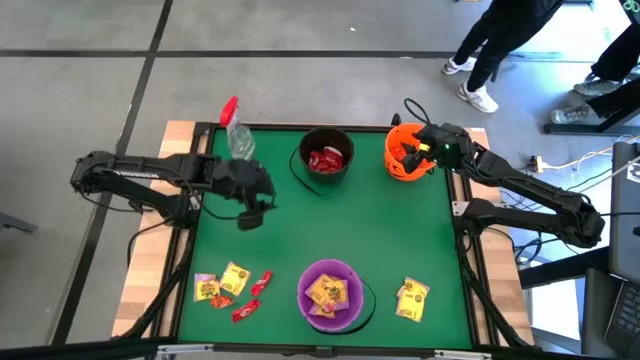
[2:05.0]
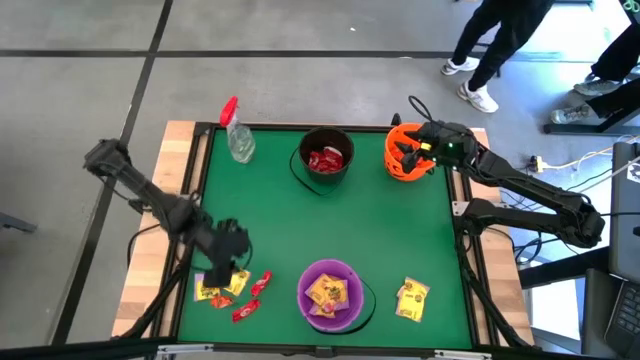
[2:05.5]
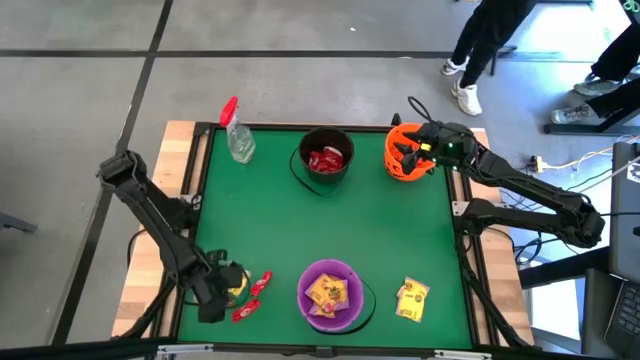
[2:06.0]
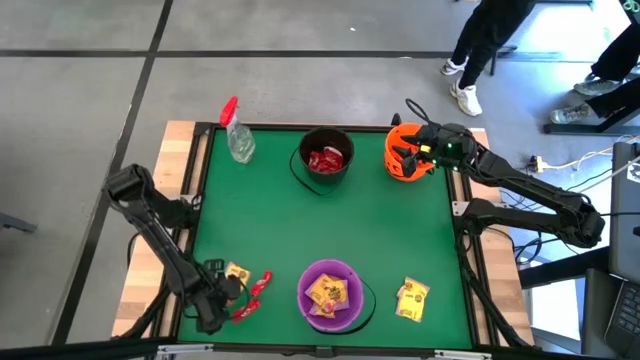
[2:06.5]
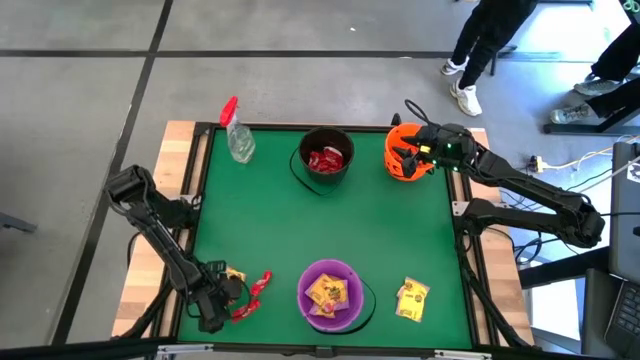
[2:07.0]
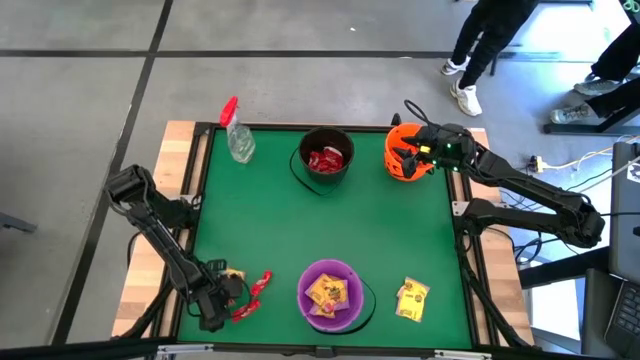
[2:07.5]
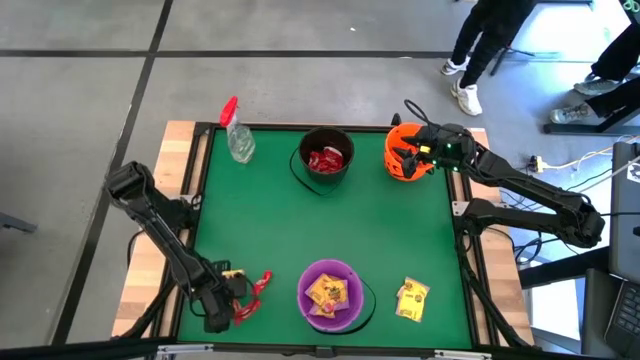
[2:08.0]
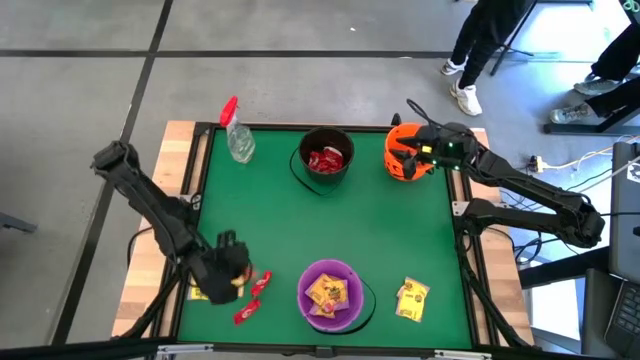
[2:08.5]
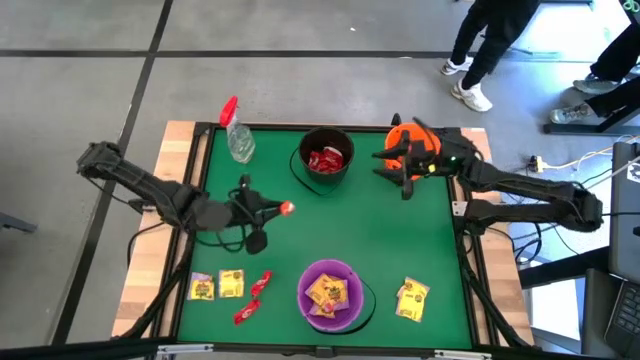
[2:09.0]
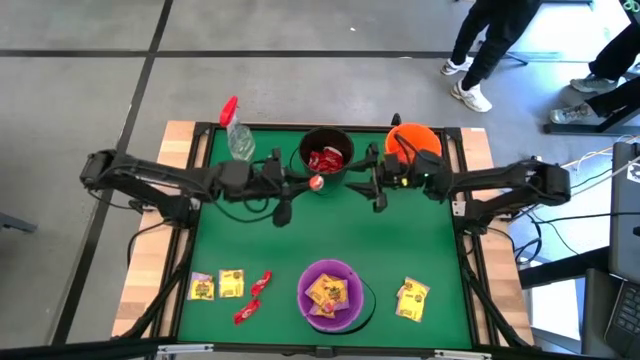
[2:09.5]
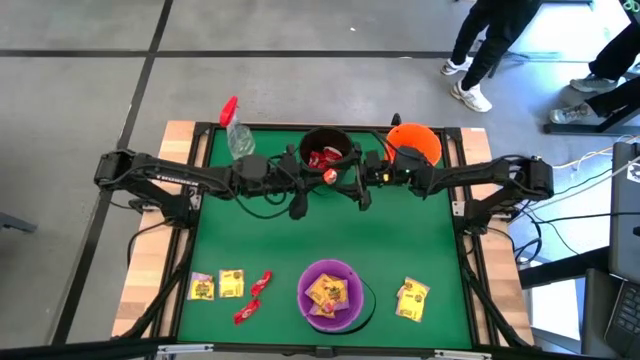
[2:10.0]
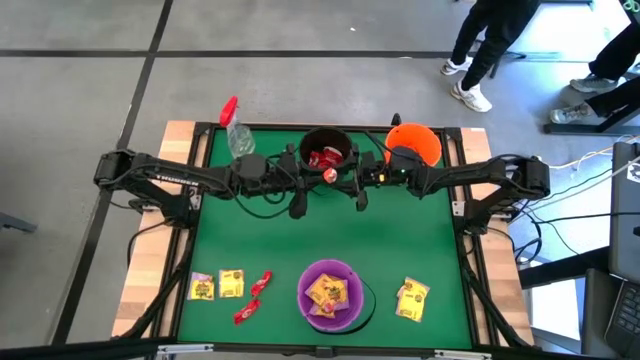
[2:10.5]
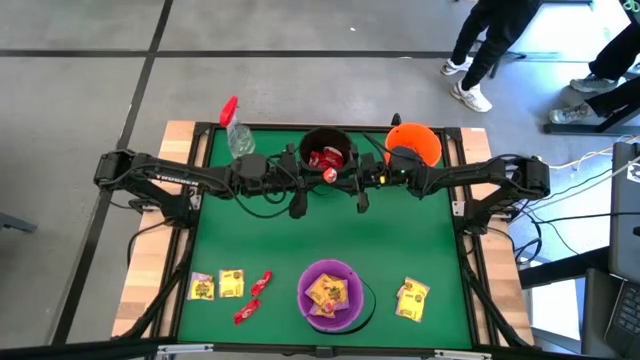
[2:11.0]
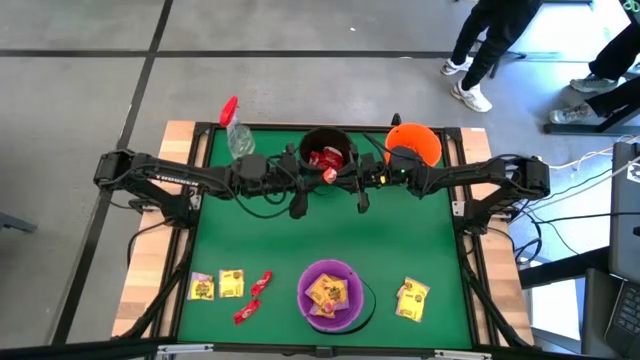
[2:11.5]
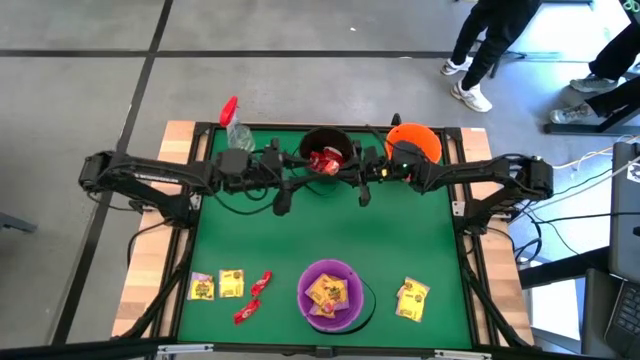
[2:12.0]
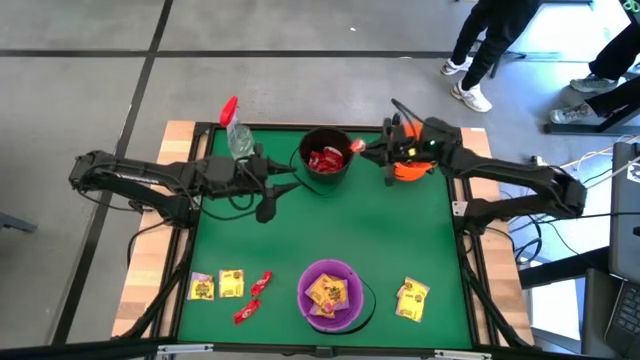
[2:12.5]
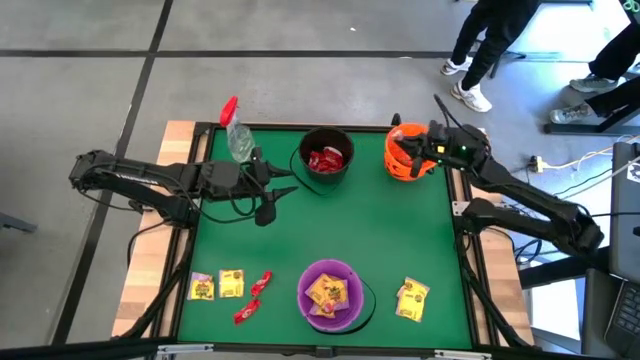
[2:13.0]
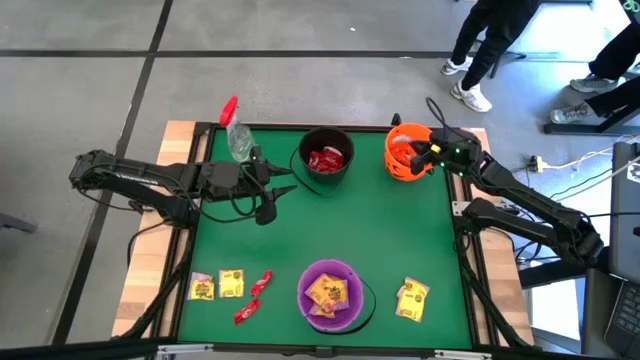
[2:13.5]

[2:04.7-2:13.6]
Task: Organize candy in baskets
Put the orange candy pack into the orange bucket

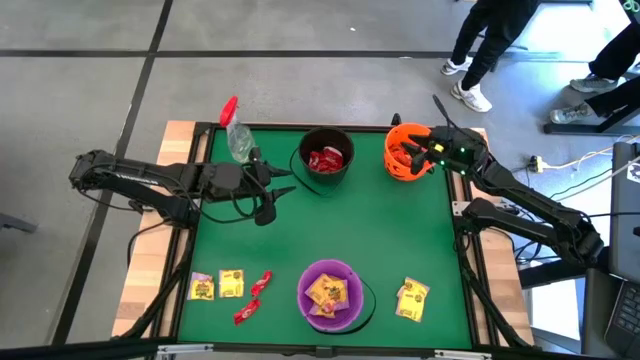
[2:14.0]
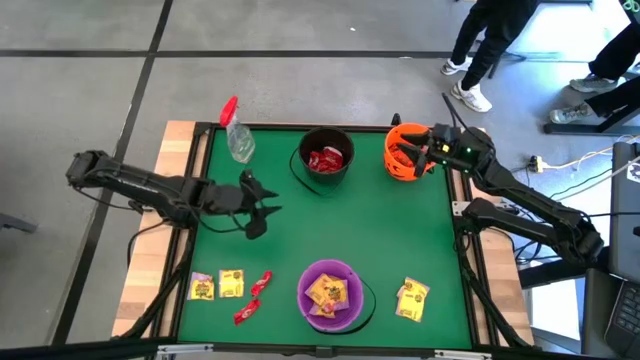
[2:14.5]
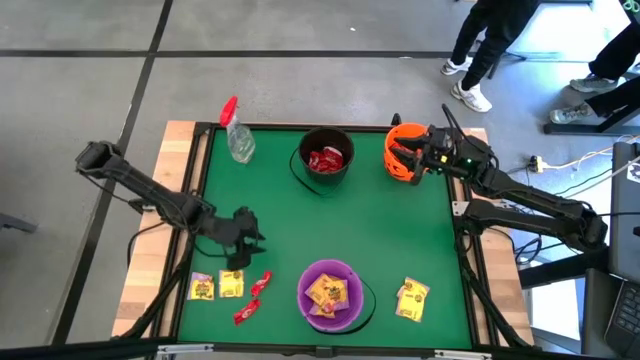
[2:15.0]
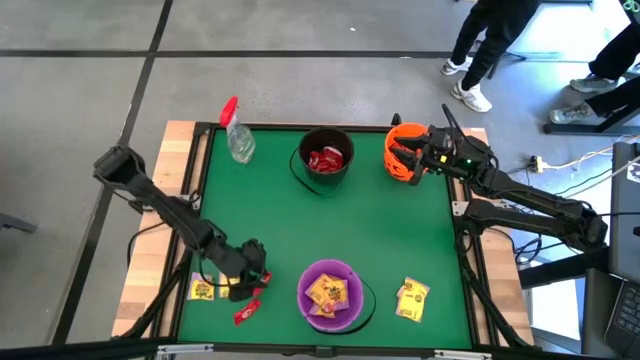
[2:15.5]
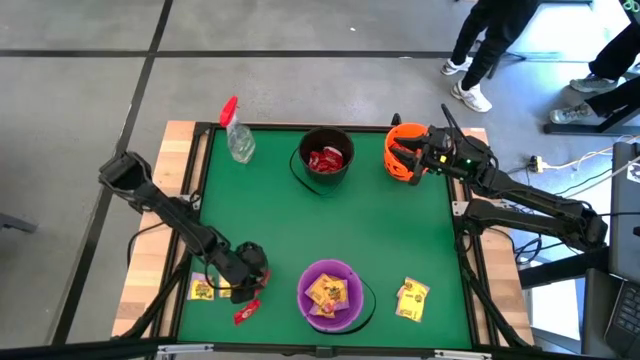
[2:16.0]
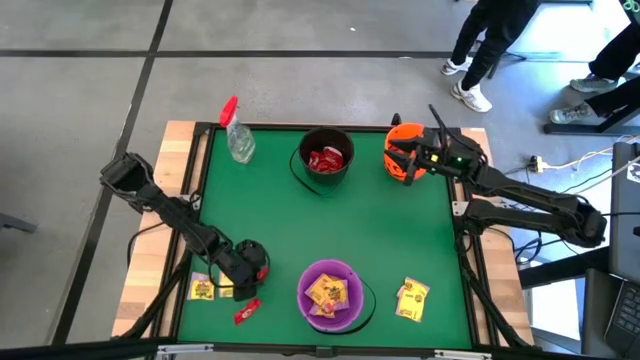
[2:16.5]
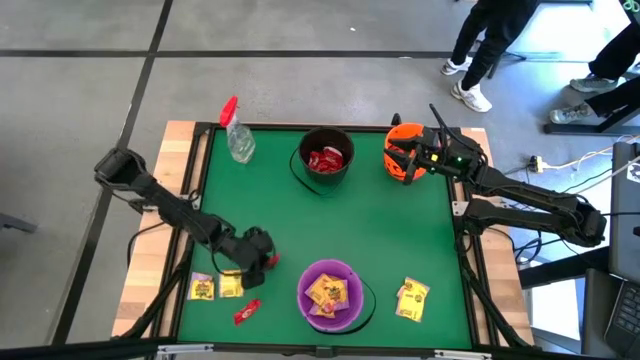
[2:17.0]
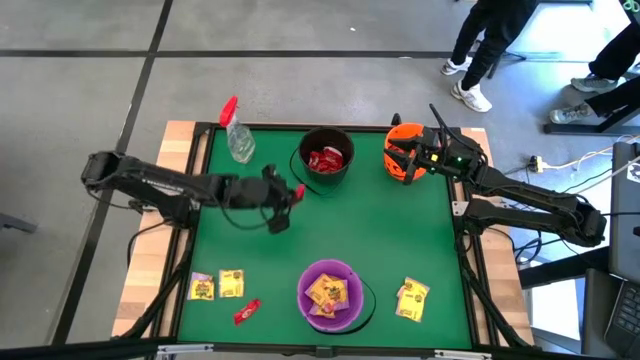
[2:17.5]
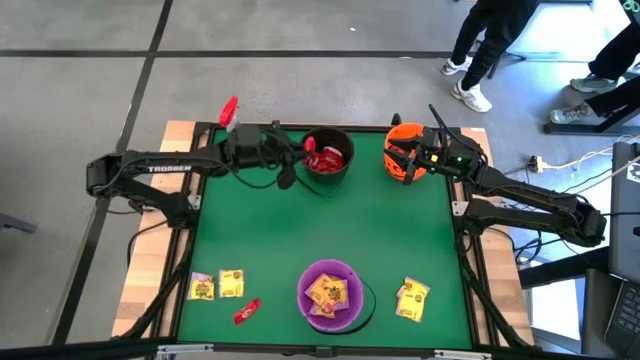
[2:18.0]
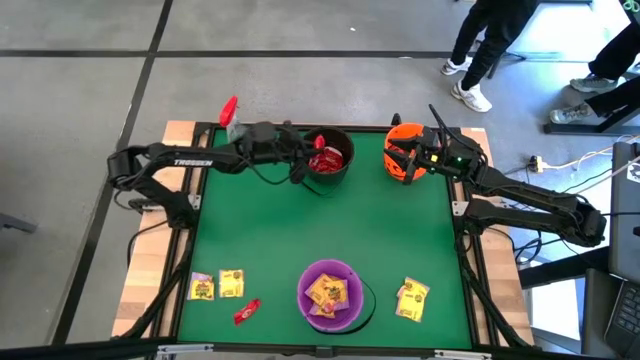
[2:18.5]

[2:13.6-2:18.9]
Put the top red candy pack into the black bucket

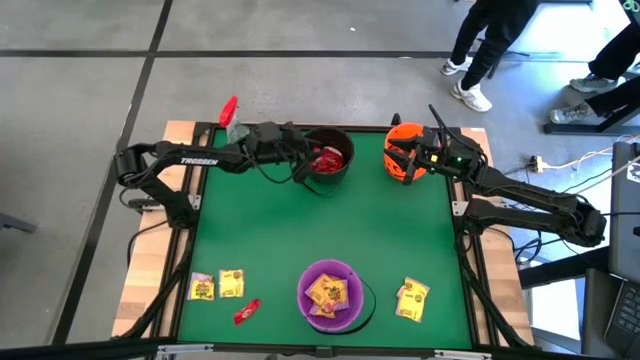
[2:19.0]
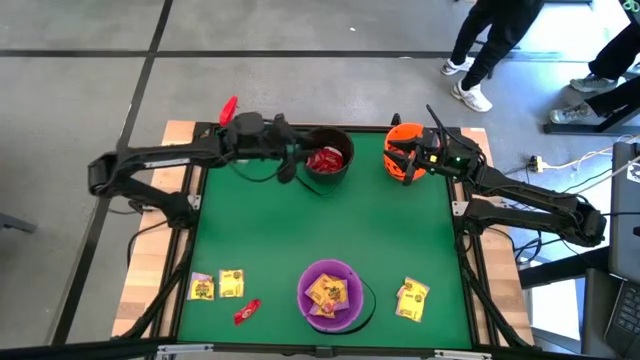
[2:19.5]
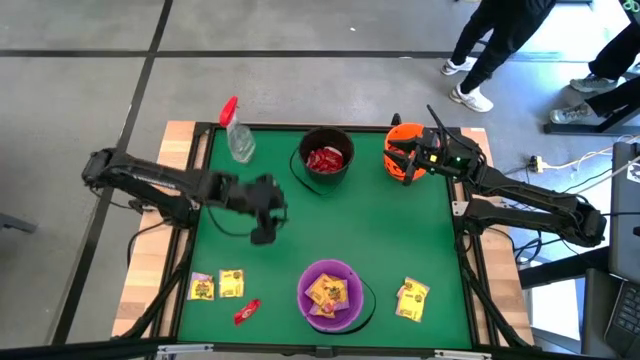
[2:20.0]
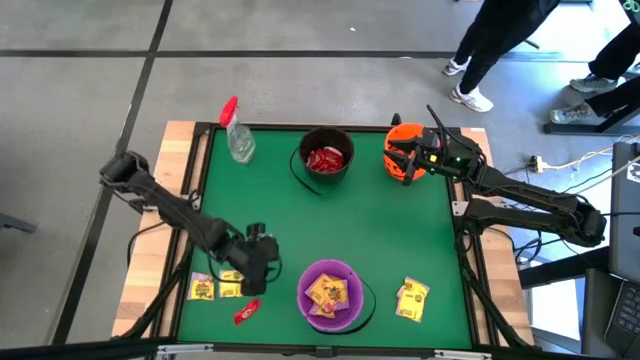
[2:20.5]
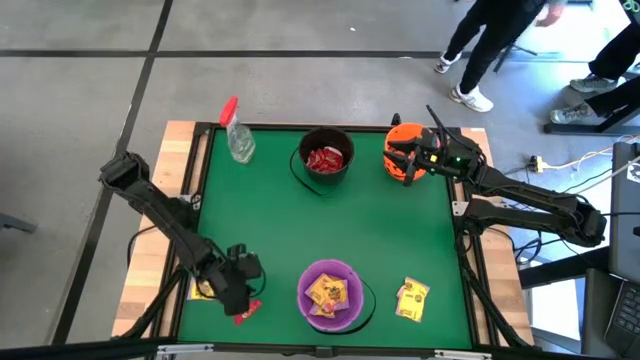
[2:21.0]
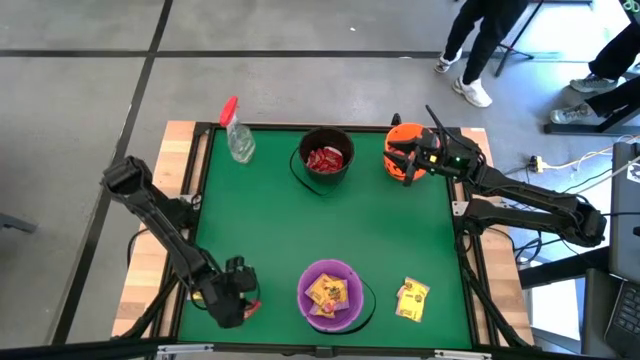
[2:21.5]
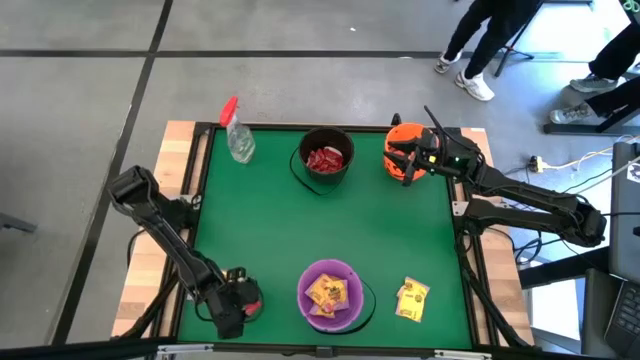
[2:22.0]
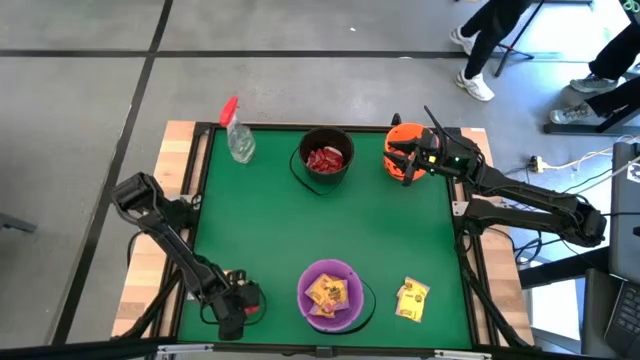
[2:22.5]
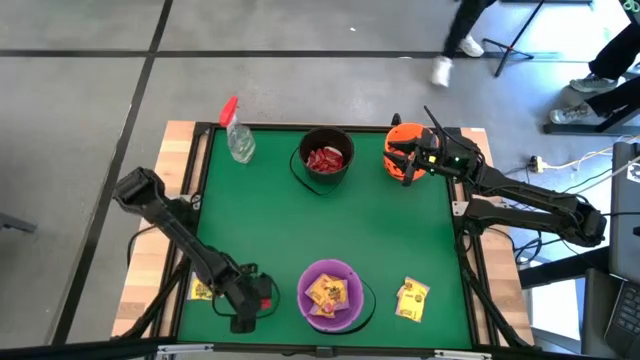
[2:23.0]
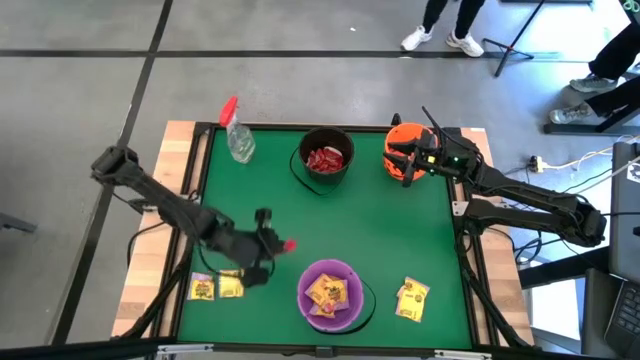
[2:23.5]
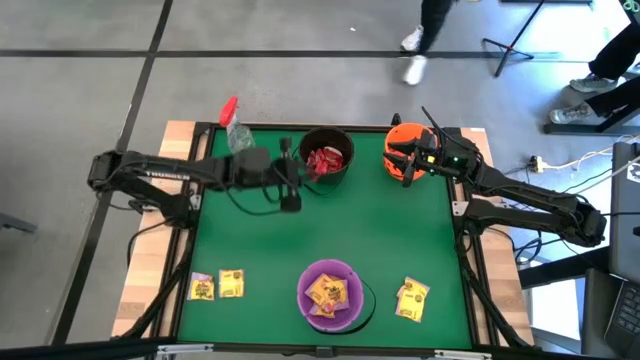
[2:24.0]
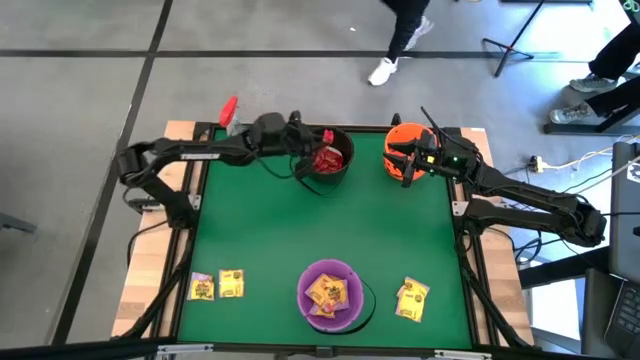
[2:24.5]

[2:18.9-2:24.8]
Put the red candy pack into the black bucket

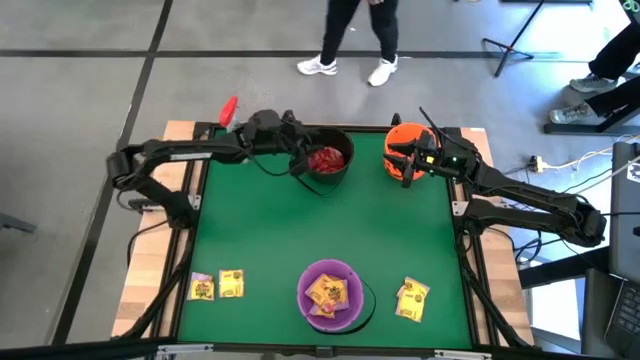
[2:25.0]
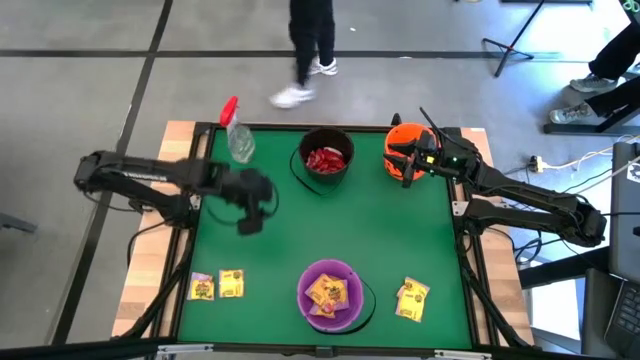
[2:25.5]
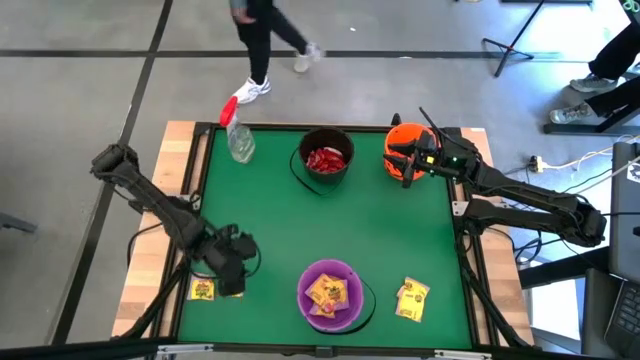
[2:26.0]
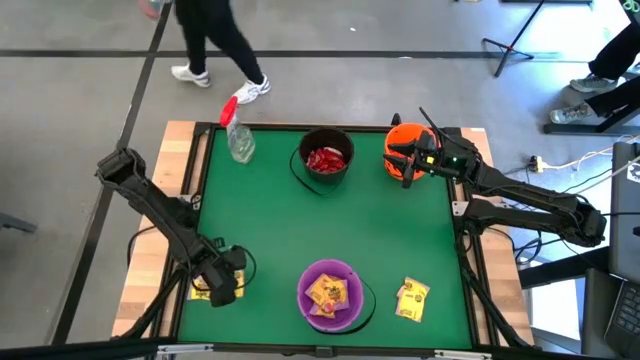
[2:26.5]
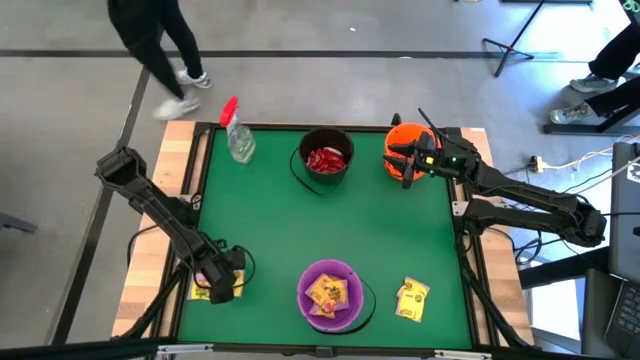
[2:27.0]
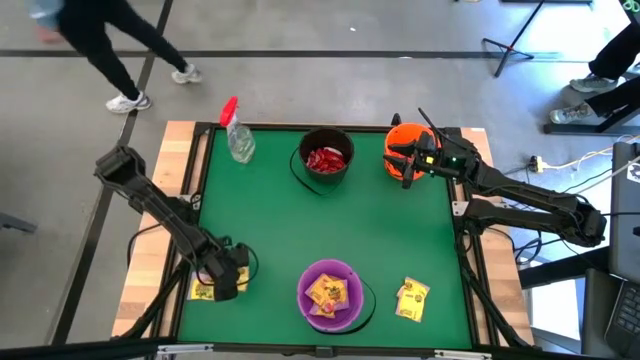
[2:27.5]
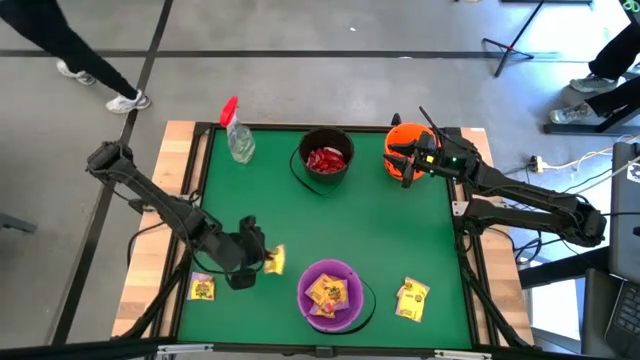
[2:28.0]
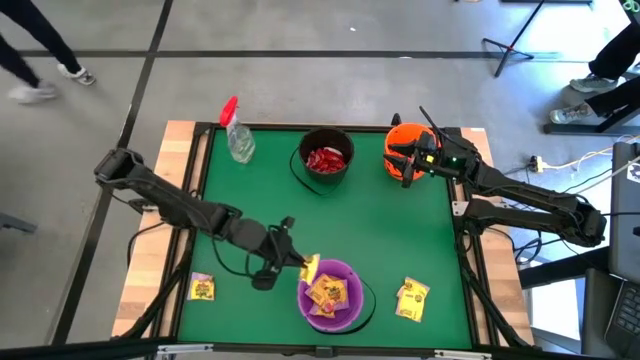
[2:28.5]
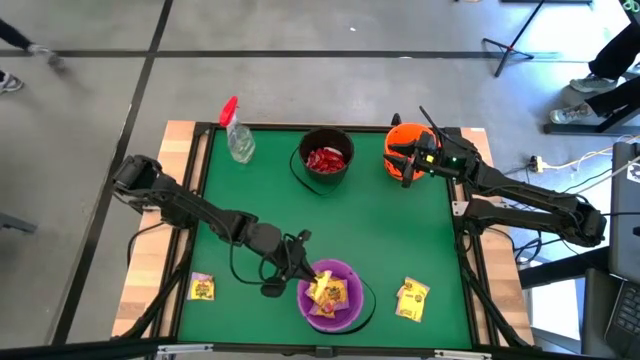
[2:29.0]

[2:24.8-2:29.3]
Put the yellow candy pack into the purple bucket
